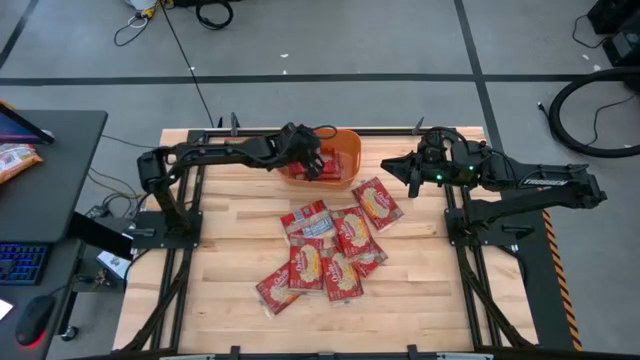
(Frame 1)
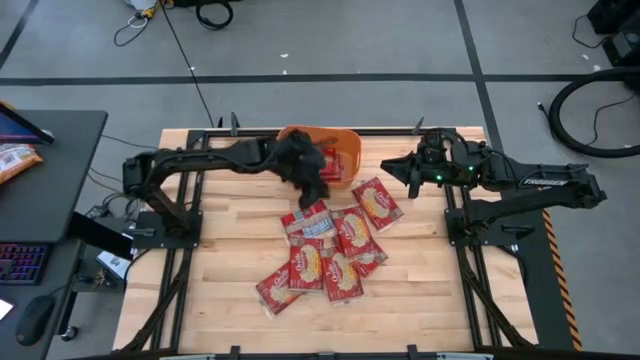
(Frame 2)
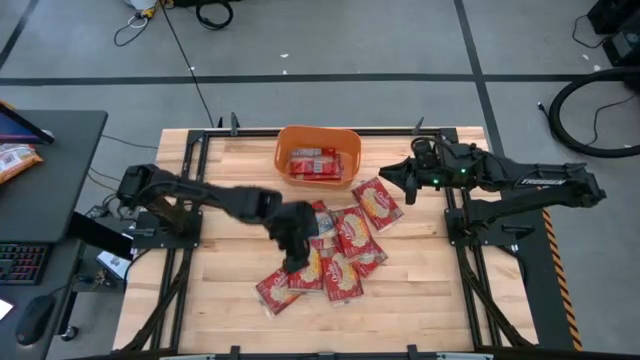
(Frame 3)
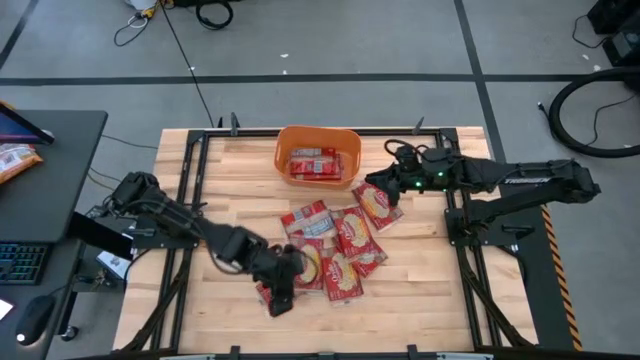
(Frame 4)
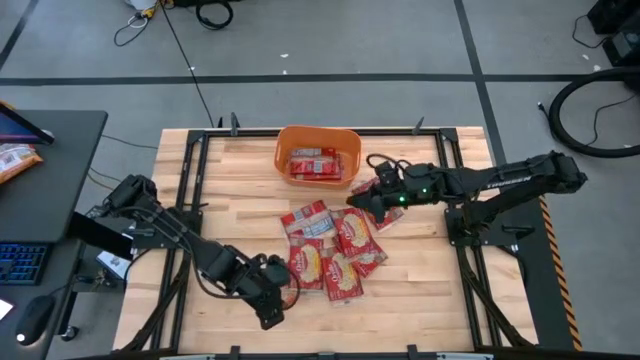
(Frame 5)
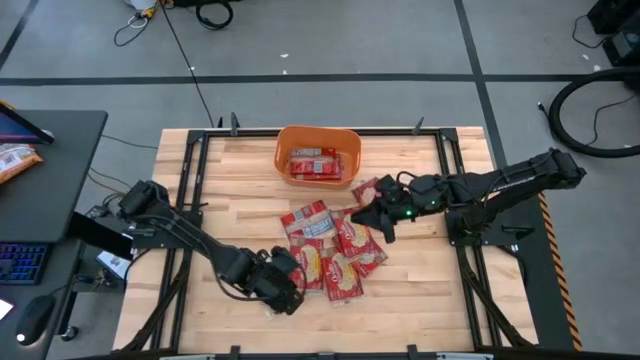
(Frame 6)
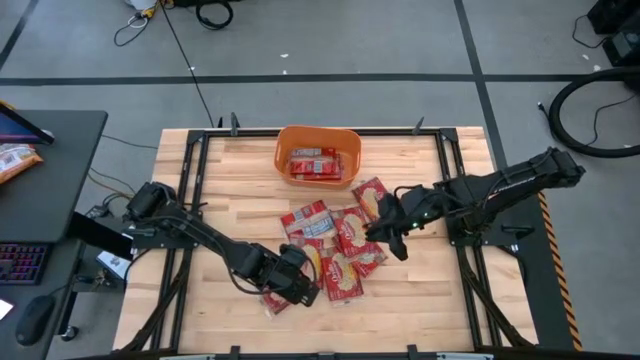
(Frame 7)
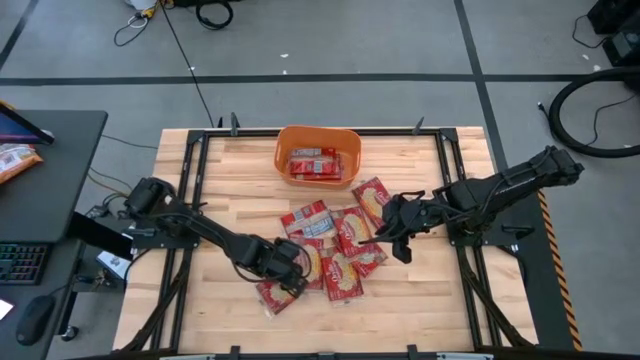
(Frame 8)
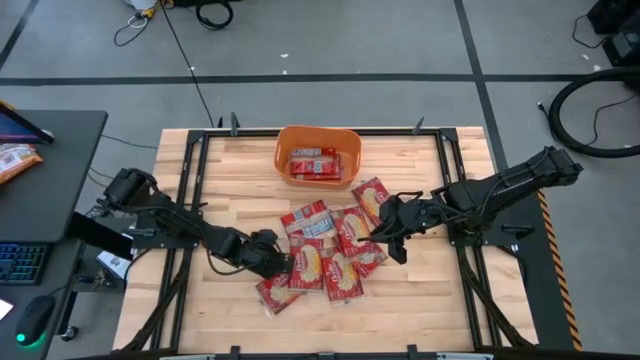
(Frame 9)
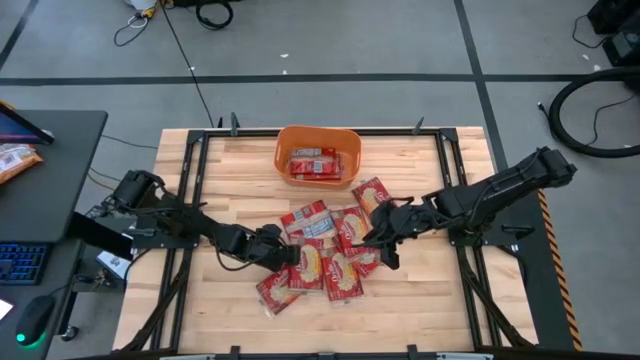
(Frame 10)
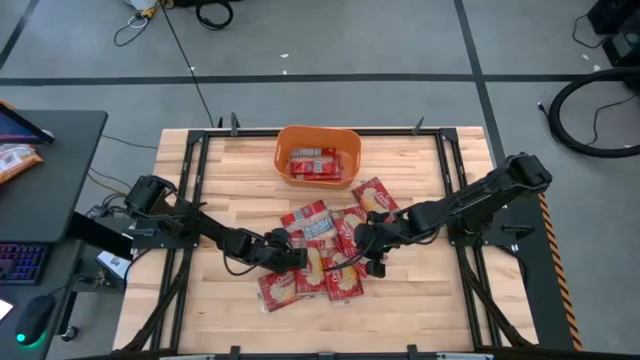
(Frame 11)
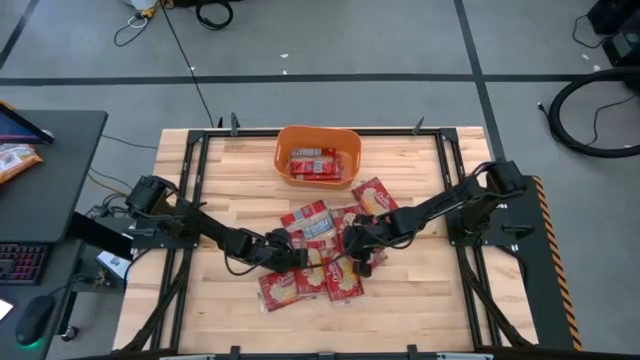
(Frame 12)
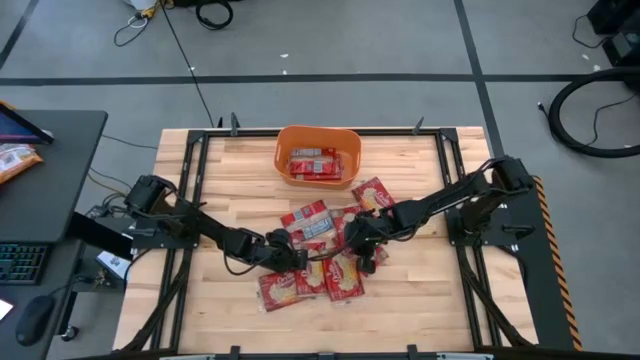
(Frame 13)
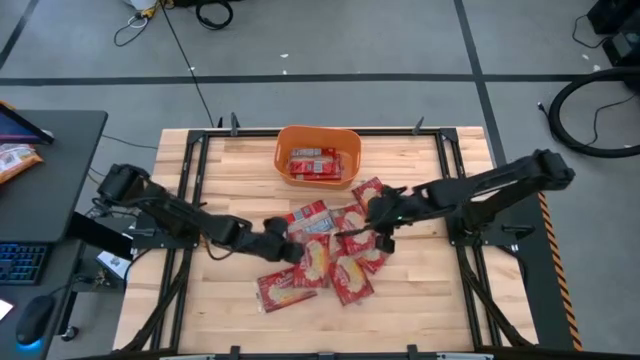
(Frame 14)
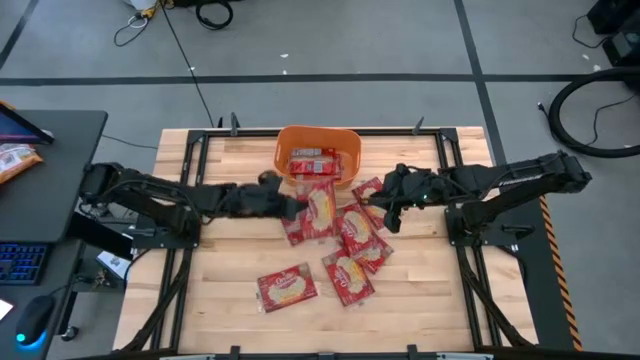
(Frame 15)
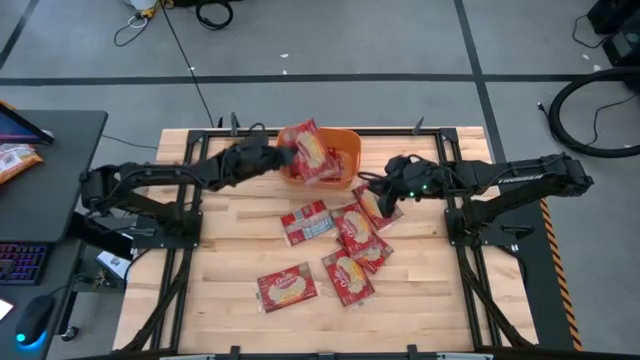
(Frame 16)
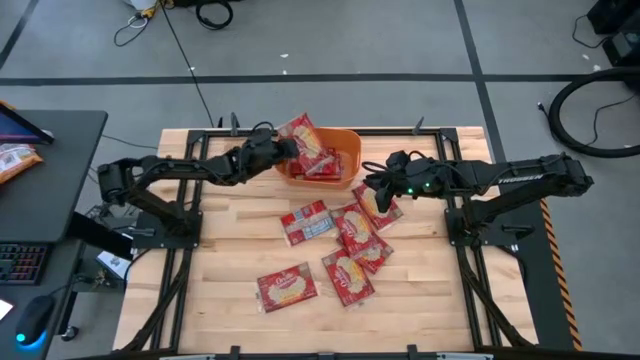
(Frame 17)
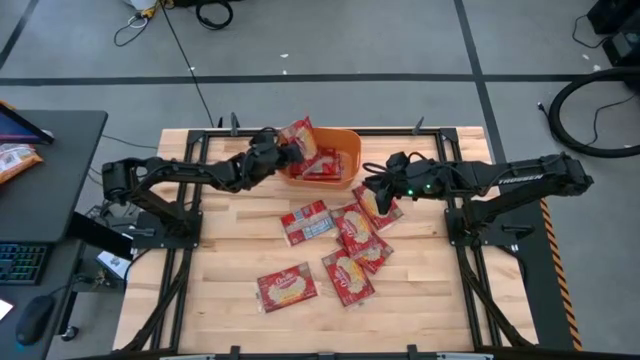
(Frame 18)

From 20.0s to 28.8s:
Task: Sort popcorn bags into baskets
Put the popcorn bag into the orange bin

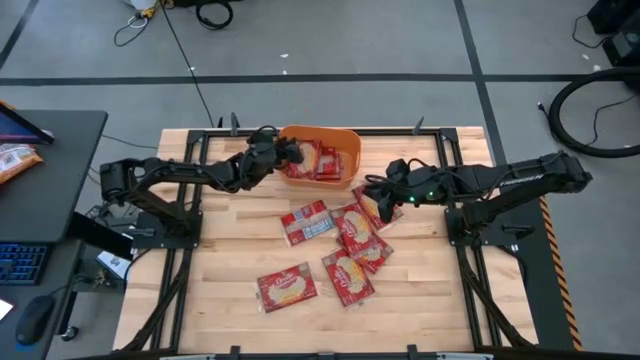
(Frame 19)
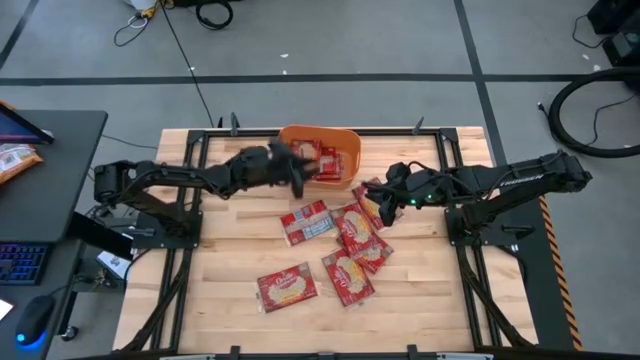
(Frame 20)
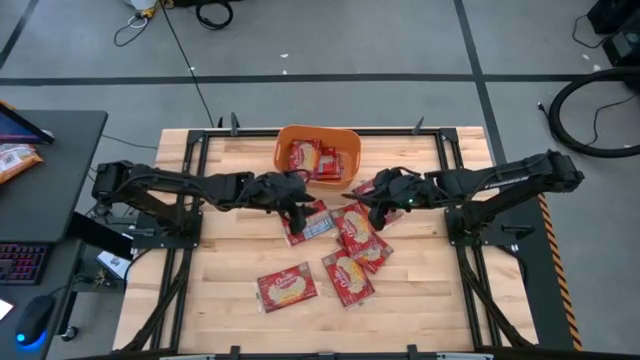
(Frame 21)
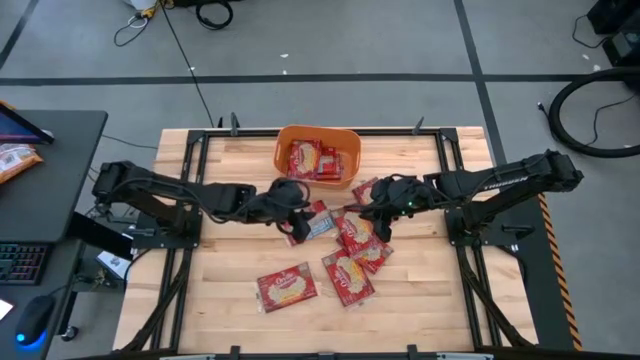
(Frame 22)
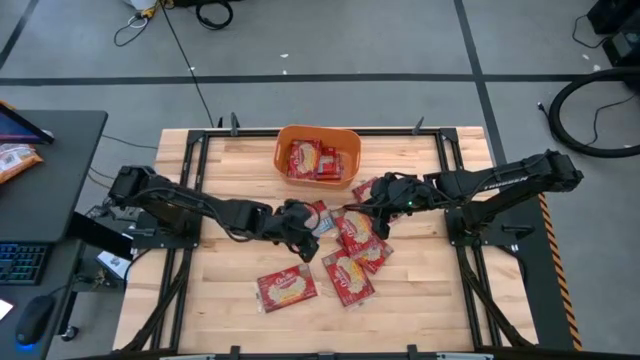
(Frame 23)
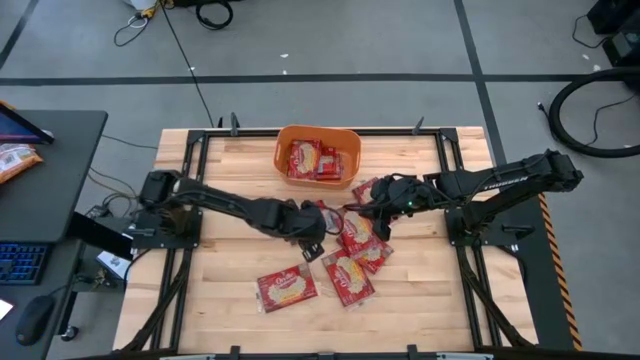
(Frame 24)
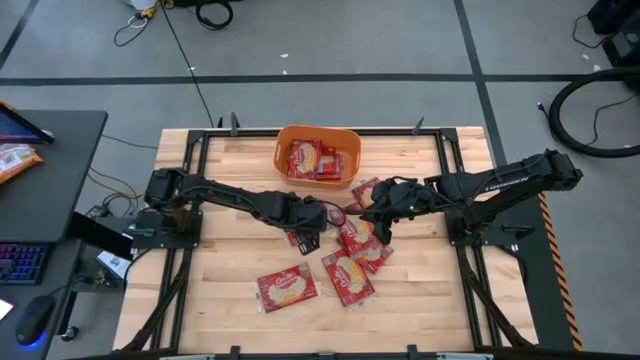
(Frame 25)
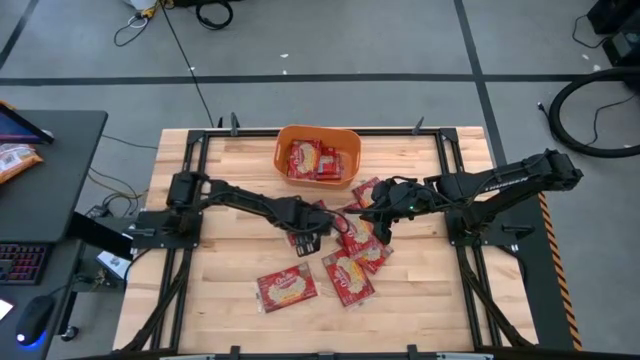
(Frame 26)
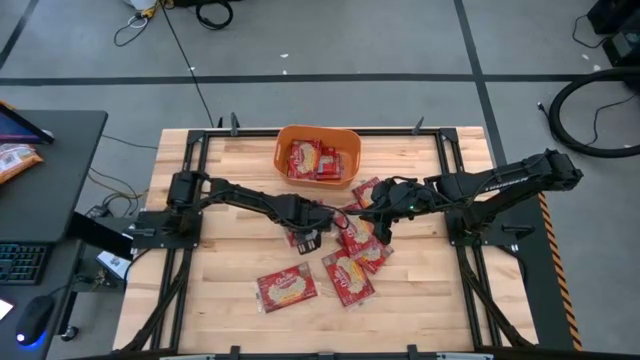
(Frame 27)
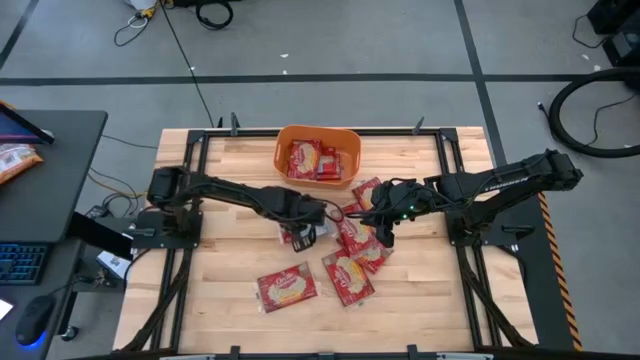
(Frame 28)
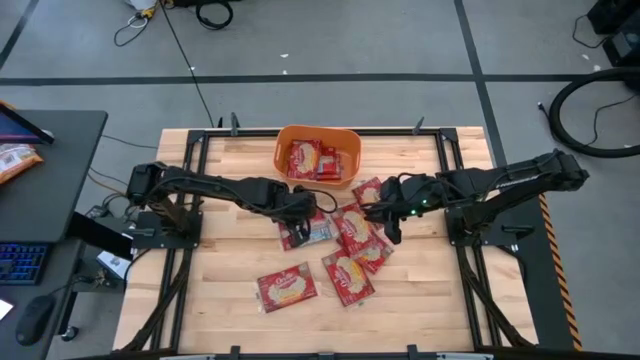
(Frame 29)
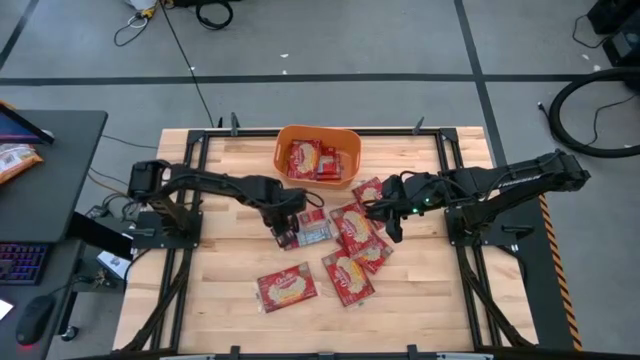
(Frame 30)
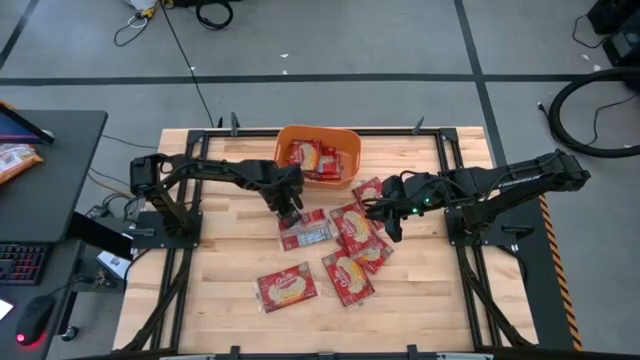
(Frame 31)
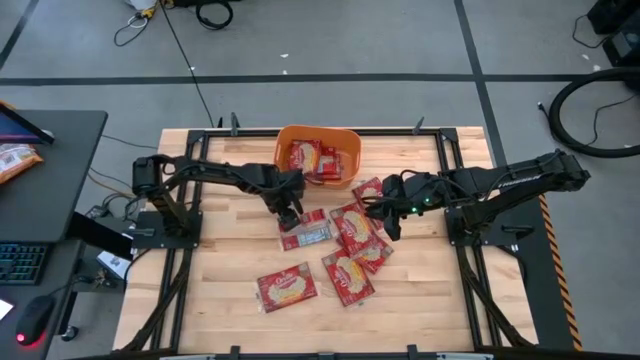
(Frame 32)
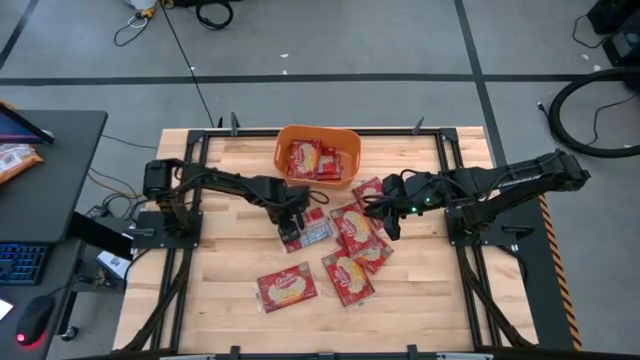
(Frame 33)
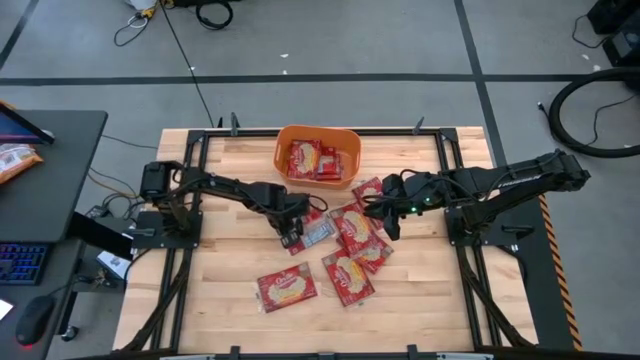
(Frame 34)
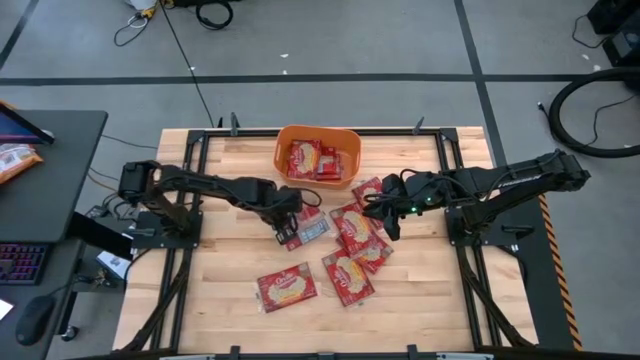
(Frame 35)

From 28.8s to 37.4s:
Put the popcorn bag into the orange bin

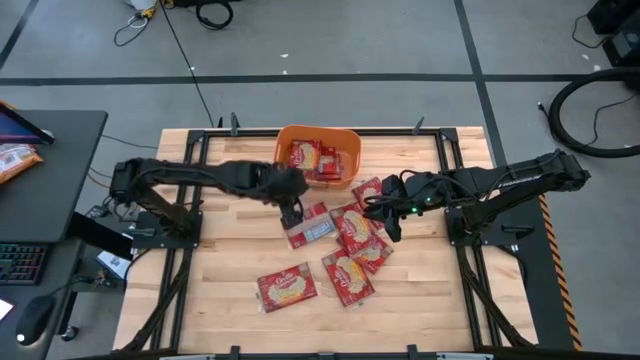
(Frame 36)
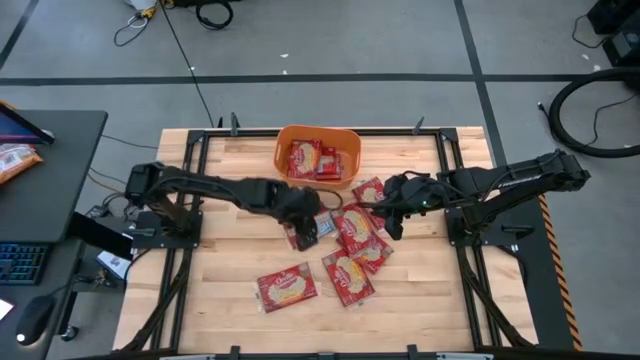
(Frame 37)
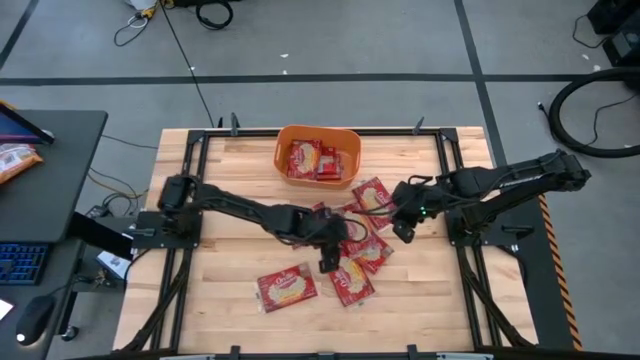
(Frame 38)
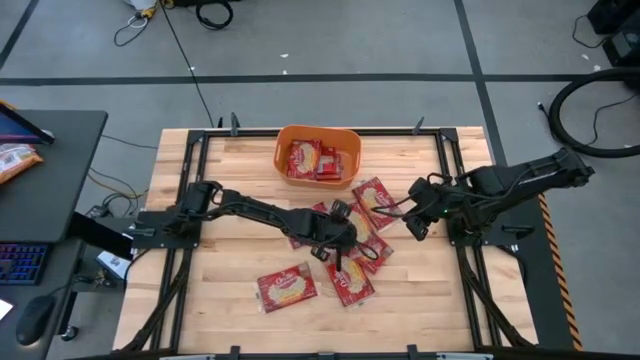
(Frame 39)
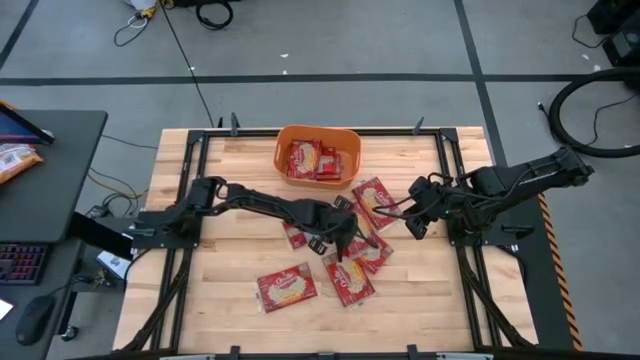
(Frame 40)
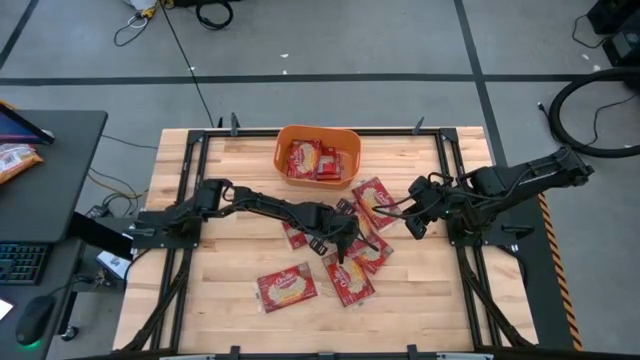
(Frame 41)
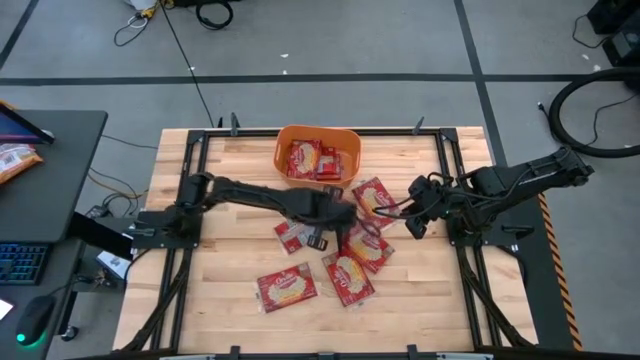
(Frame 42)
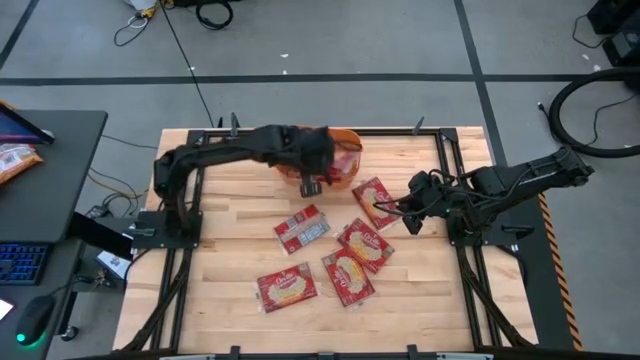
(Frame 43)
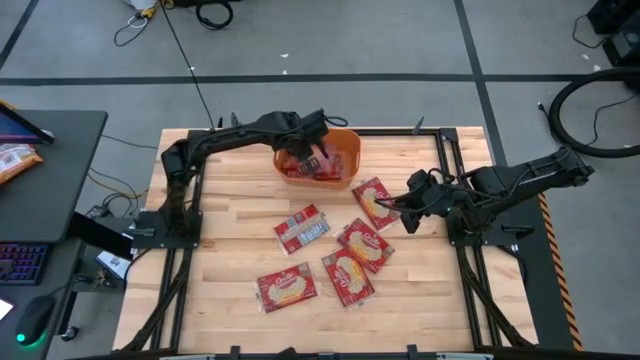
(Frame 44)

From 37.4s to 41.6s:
Put the popcorn bag into the orange bin
